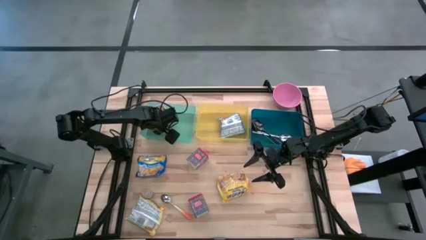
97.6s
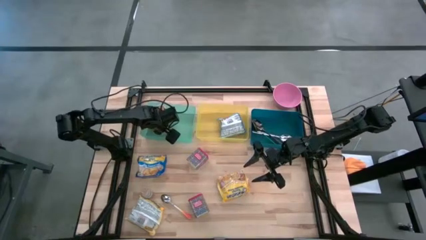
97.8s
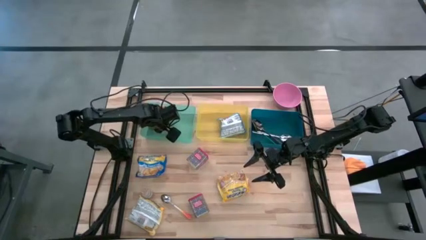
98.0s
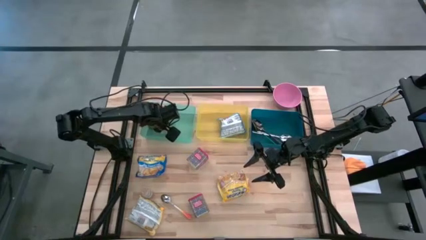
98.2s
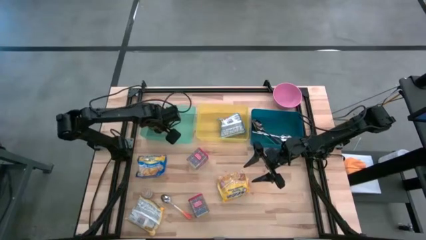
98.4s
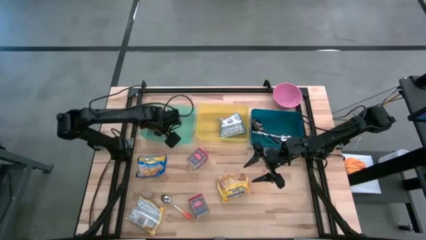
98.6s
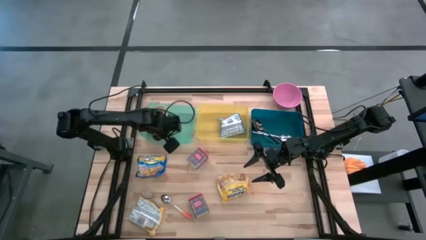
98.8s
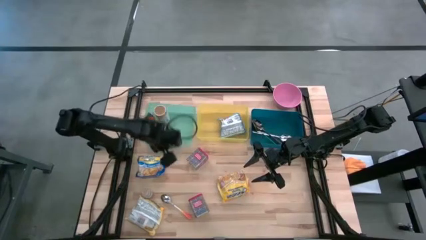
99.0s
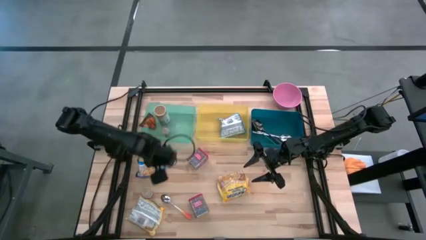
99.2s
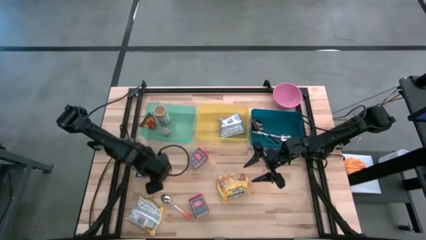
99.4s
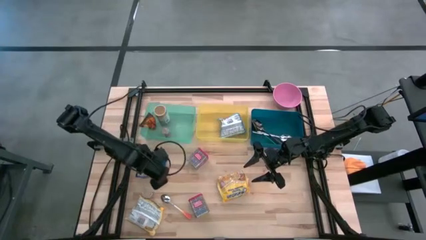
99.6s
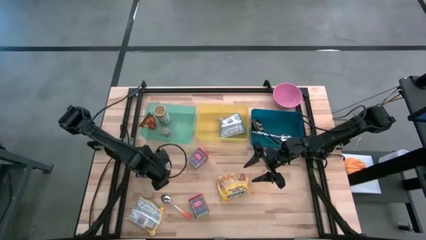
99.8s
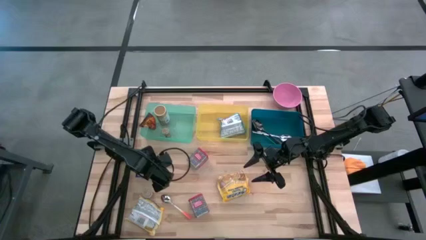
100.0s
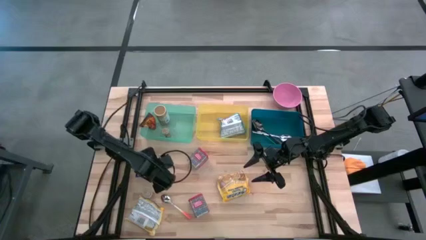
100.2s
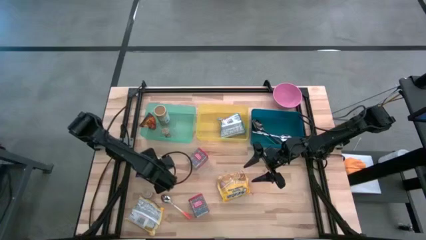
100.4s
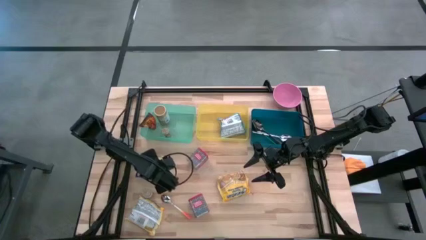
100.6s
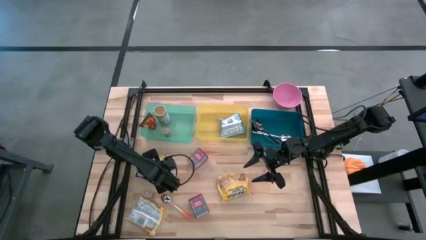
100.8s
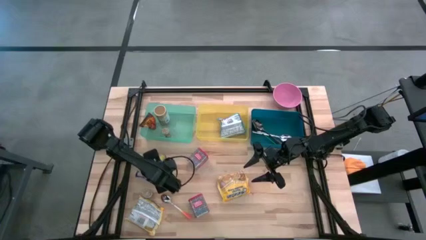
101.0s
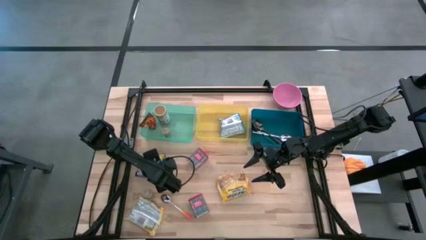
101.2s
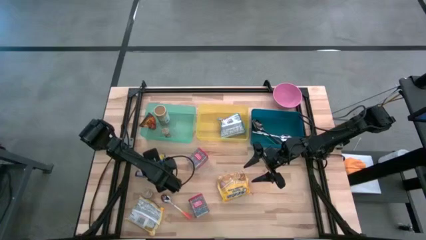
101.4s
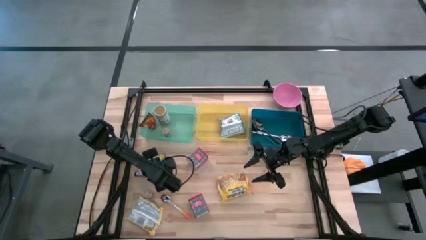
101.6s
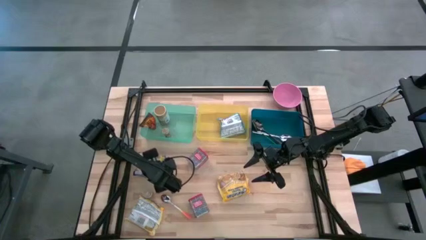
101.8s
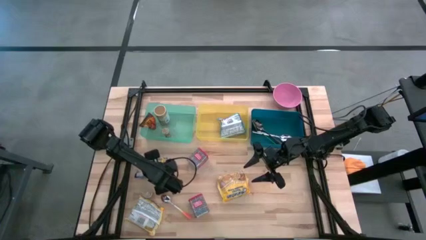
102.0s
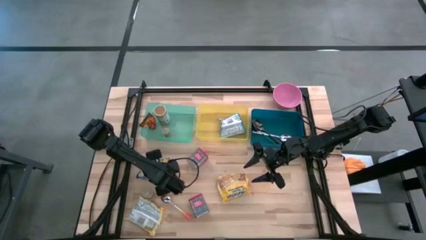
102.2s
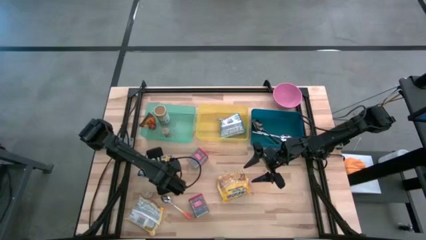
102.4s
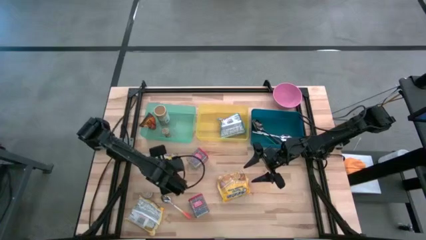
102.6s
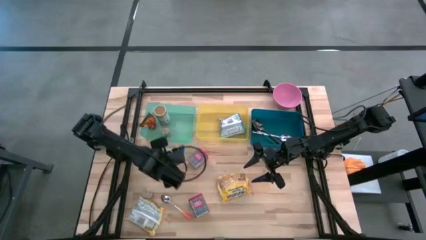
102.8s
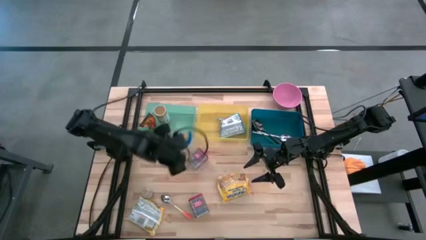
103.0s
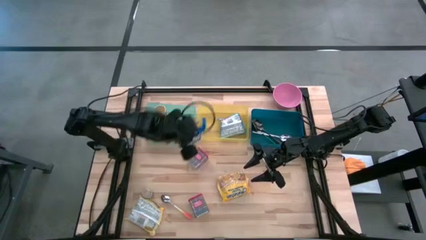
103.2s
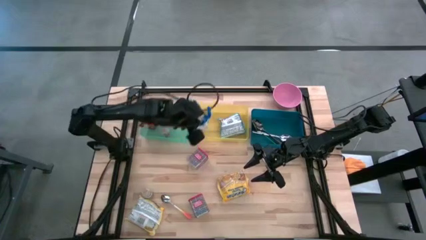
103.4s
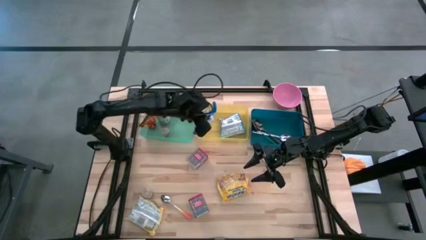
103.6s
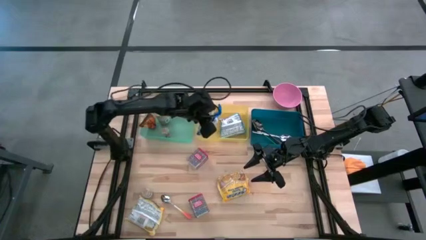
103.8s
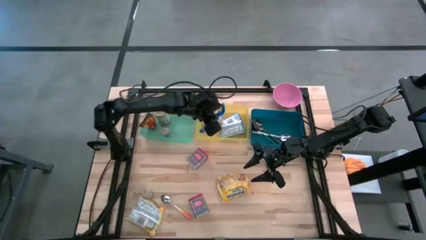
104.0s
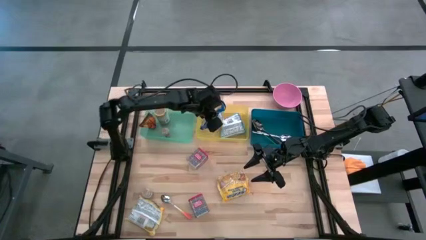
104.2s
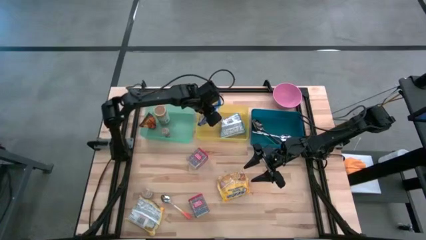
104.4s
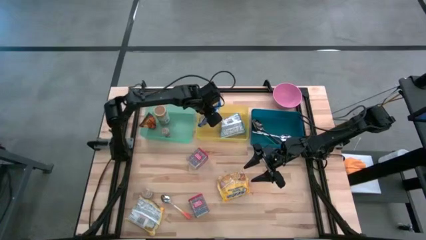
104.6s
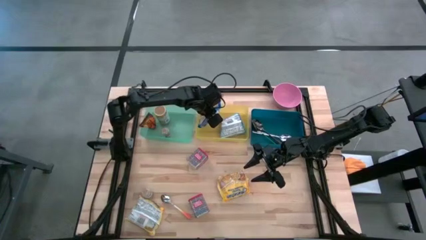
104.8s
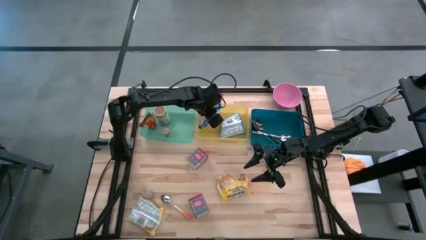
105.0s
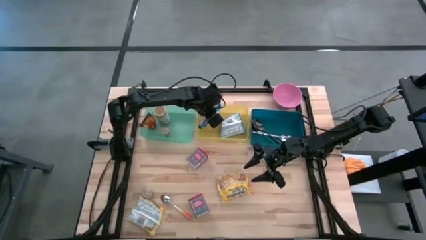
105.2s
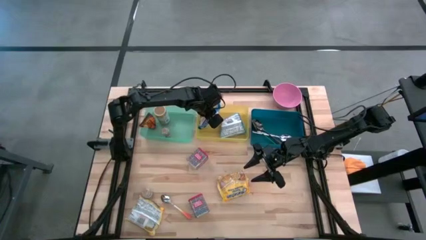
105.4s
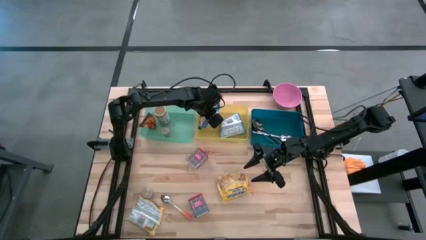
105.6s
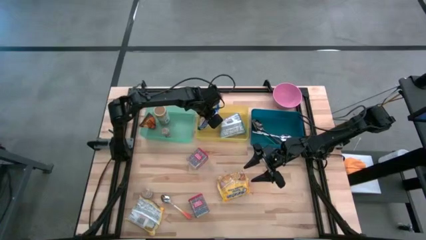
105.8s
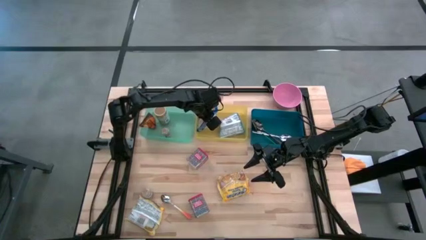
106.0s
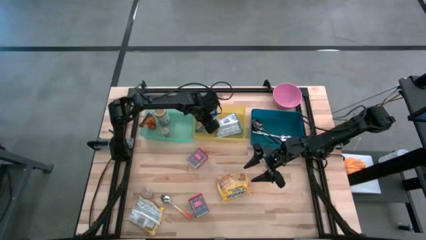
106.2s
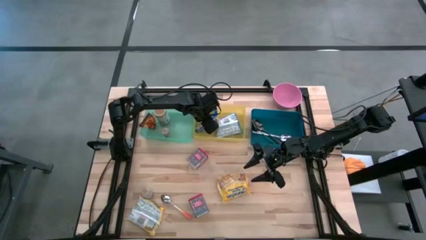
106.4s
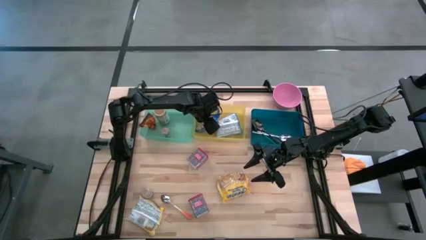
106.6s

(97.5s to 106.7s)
Put the dark blue noodle pack into the yellow bin
